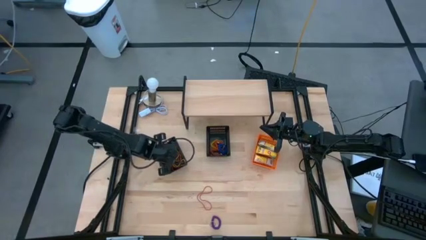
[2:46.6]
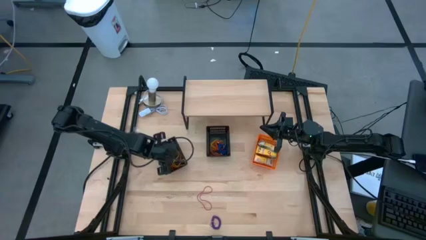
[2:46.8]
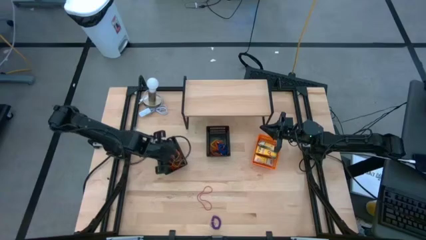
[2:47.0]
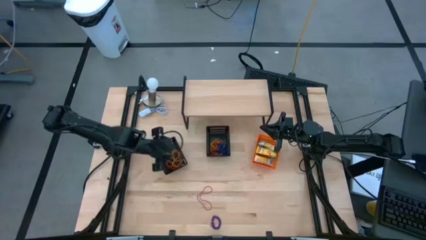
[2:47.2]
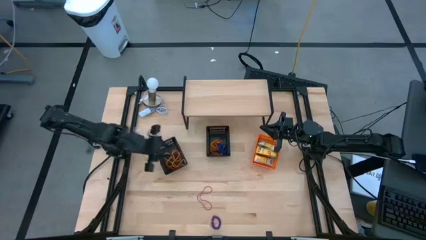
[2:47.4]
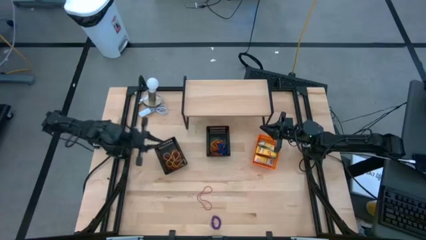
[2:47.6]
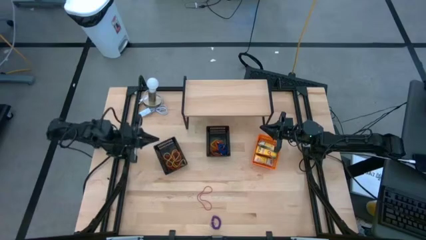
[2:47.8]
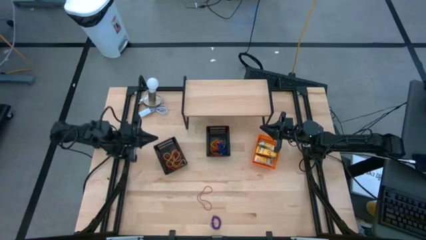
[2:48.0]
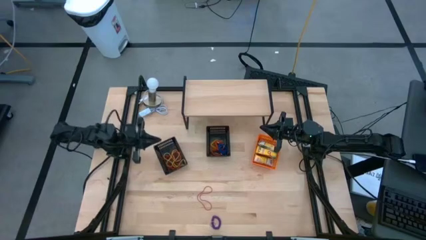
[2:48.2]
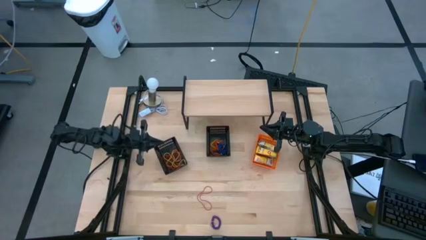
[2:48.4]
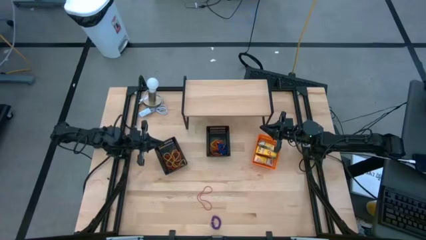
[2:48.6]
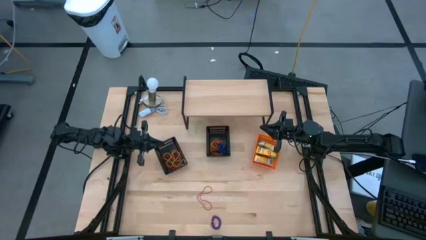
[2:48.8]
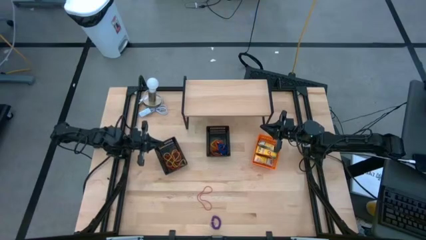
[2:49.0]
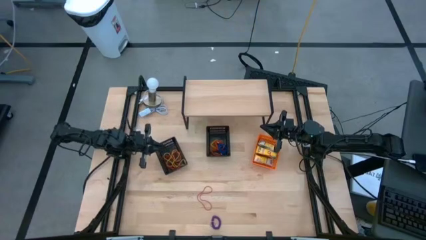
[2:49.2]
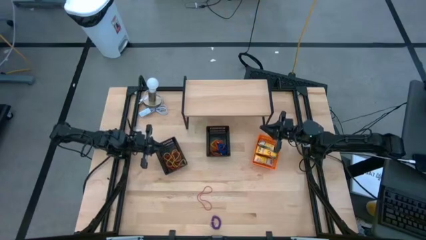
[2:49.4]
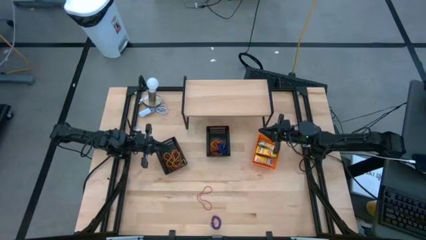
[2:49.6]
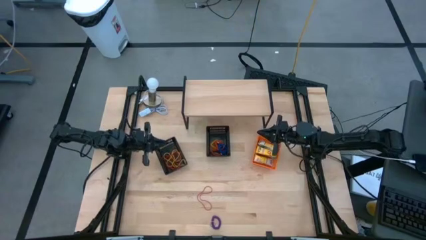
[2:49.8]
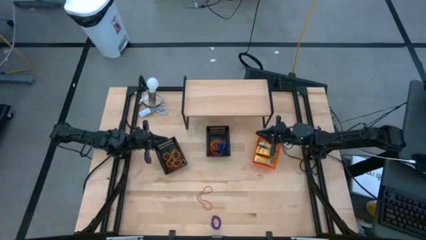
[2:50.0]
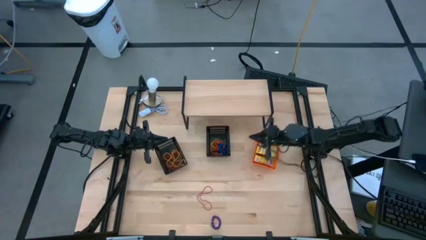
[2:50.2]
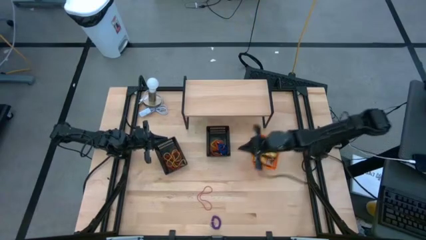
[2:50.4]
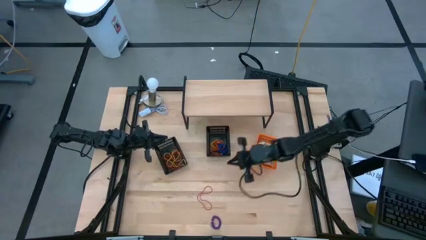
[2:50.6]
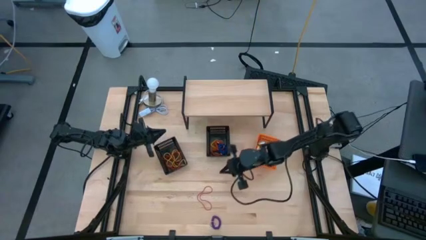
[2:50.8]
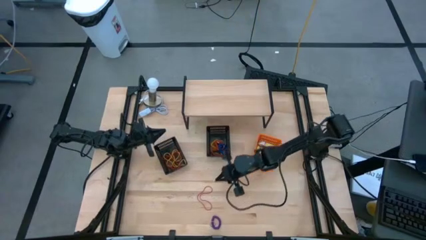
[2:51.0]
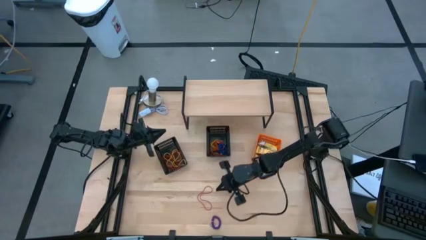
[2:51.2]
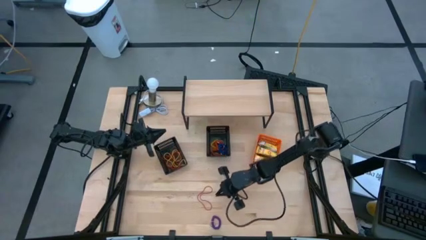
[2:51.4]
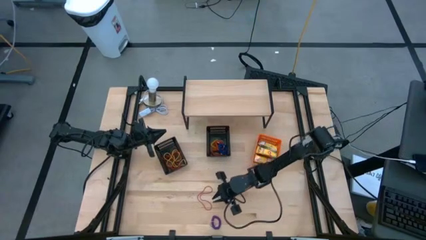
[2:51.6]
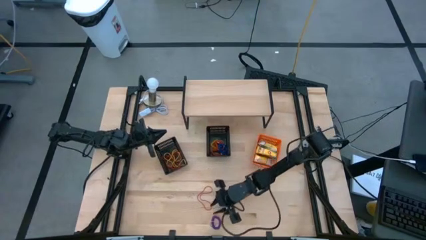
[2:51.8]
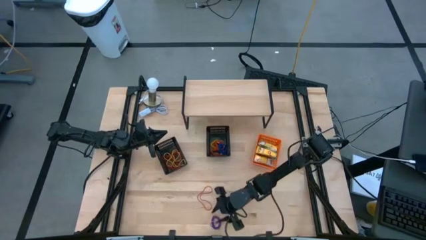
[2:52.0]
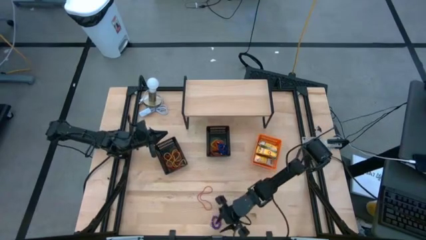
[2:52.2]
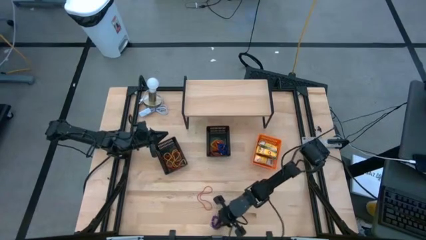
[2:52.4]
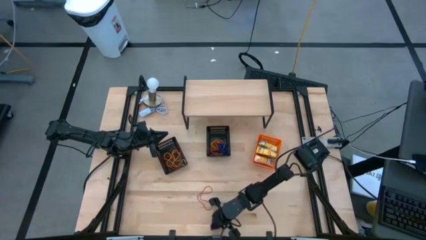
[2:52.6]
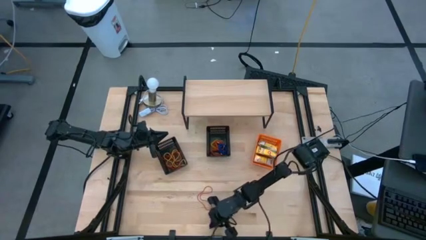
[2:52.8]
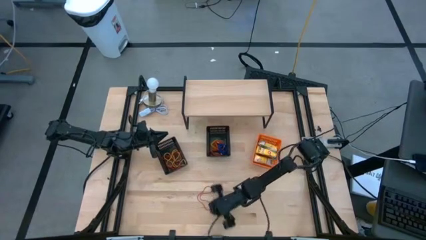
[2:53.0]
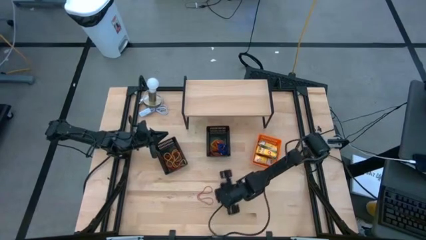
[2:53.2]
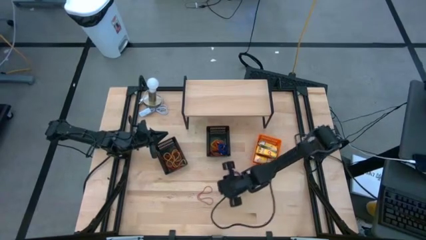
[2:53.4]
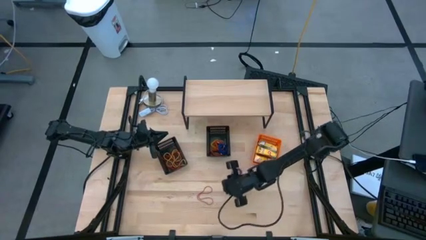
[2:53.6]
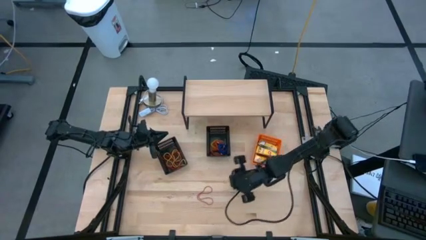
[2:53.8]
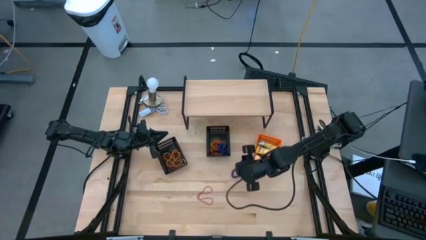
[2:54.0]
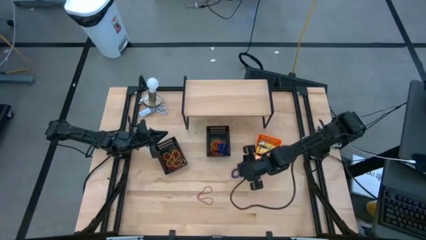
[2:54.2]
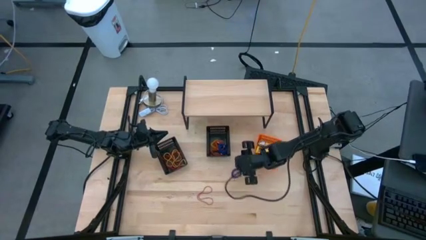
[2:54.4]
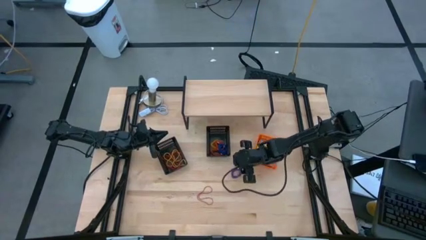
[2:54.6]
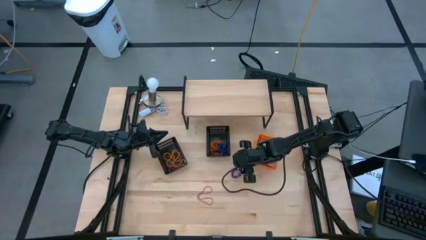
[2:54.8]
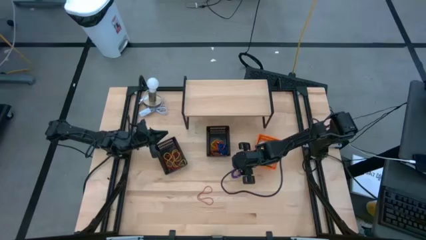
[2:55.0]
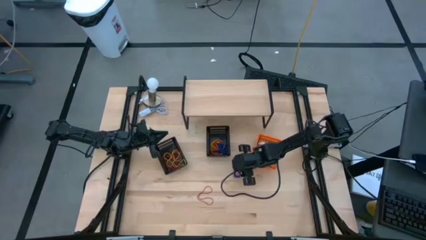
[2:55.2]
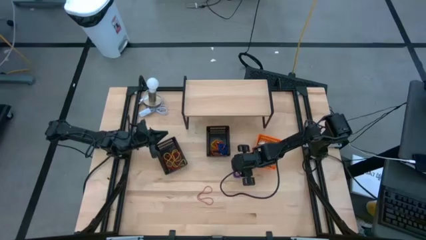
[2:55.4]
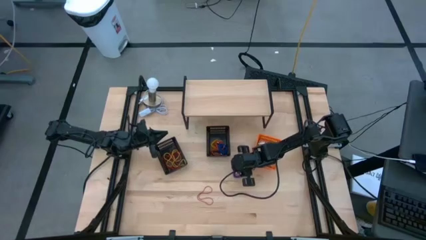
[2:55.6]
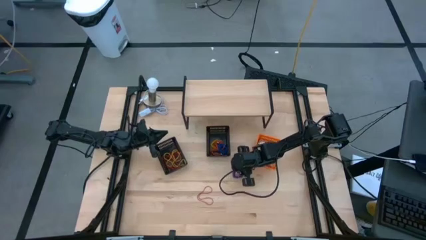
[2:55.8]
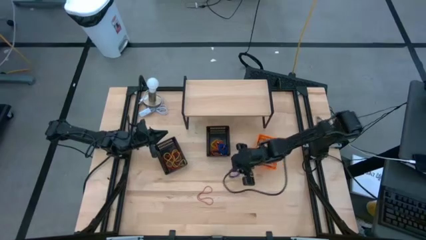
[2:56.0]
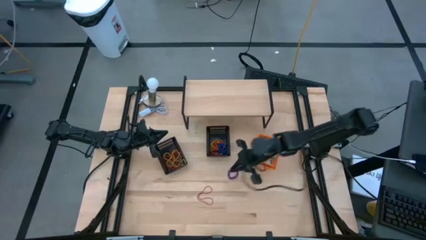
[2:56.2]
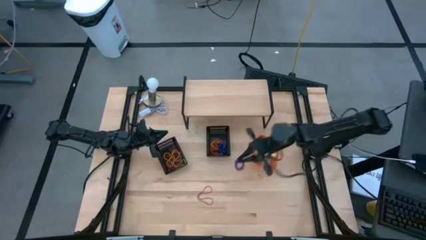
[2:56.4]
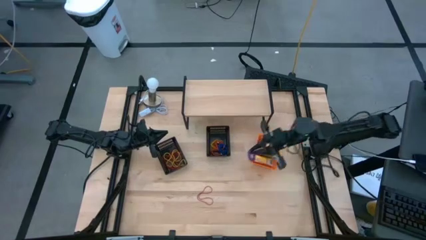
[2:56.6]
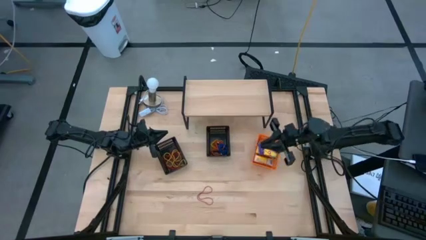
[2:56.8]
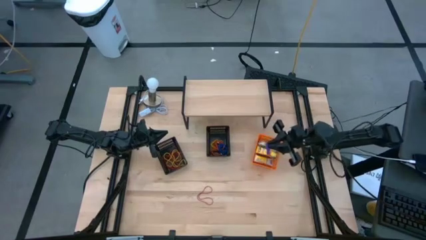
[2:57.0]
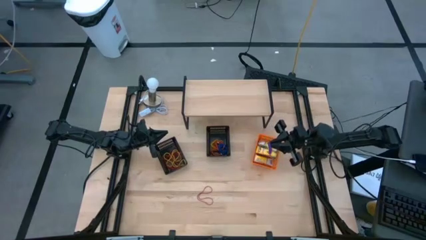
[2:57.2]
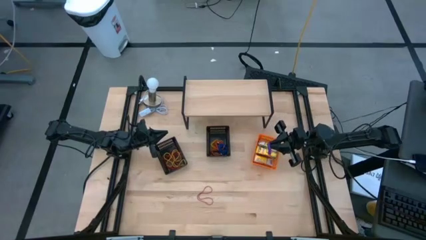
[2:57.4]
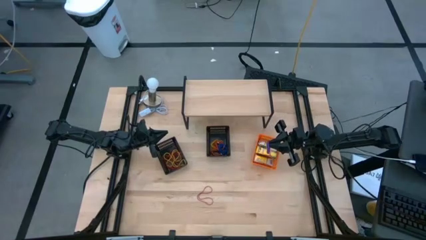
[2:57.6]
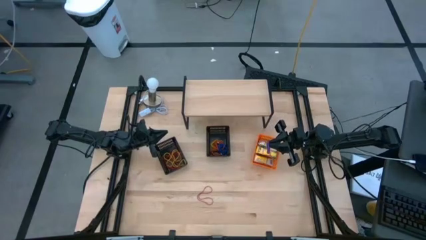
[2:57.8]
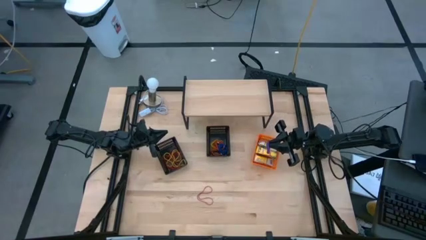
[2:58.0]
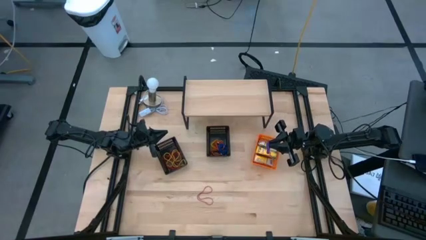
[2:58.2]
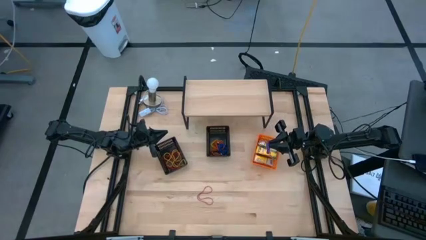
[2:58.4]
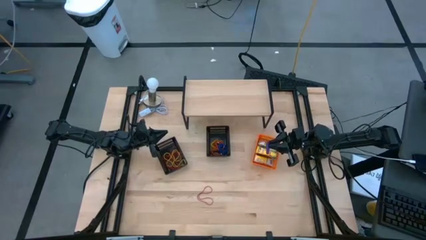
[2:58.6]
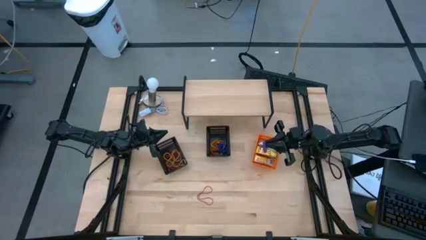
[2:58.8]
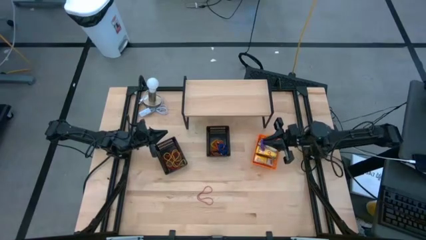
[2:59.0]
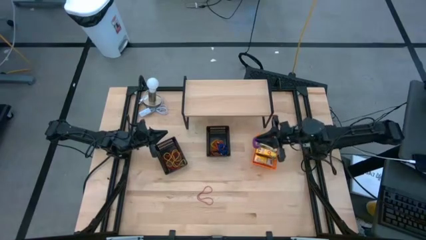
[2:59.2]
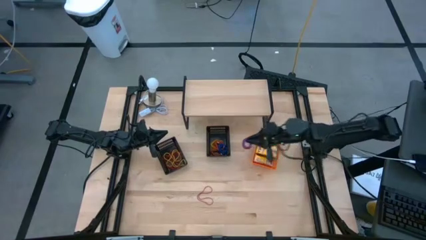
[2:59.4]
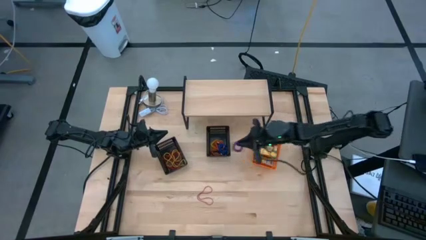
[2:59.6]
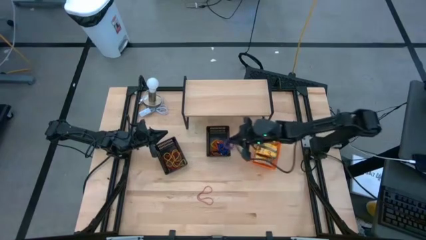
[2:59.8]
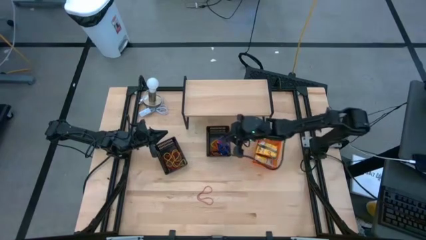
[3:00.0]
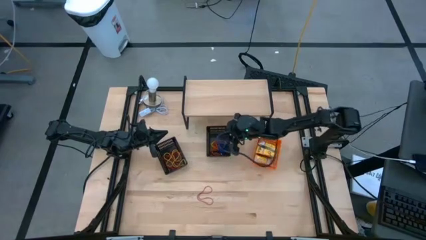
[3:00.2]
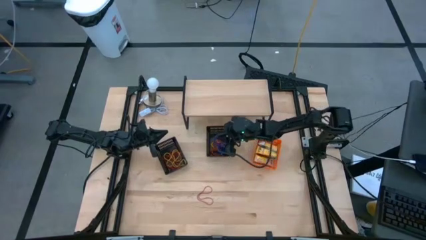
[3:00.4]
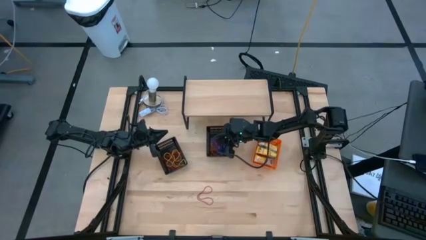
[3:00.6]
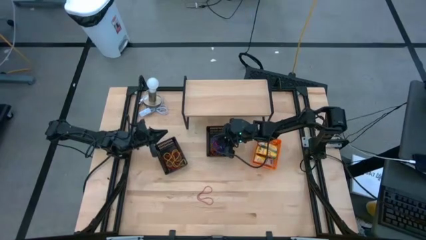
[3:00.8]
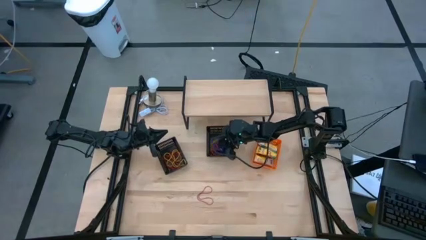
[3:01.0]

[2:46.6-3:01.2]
Task: Pick & Place Office Desk Supplies
Put the violet spring keychain into the right black basket

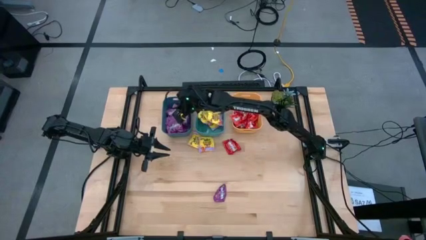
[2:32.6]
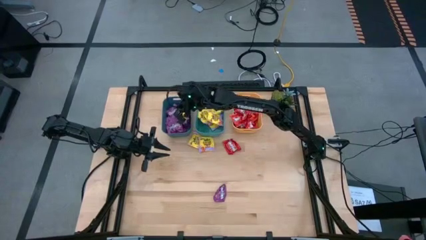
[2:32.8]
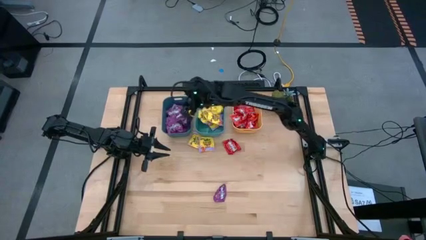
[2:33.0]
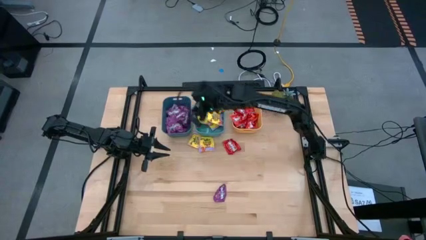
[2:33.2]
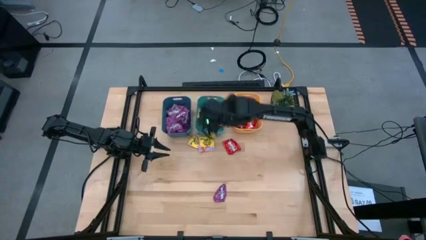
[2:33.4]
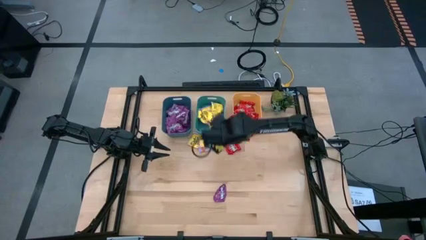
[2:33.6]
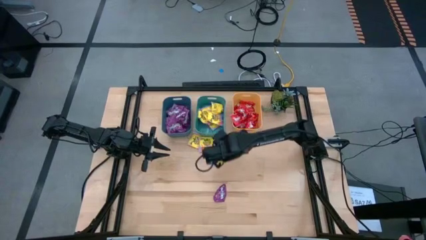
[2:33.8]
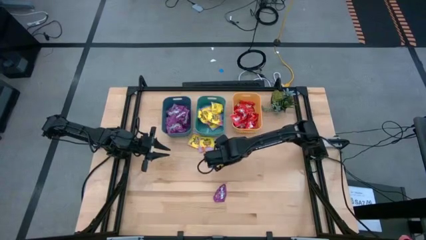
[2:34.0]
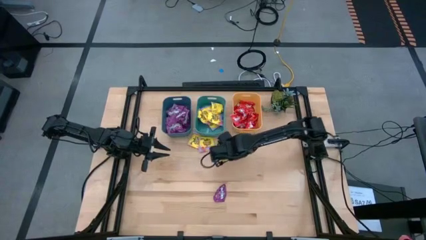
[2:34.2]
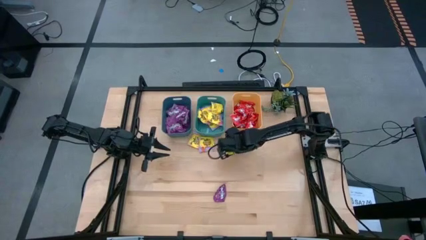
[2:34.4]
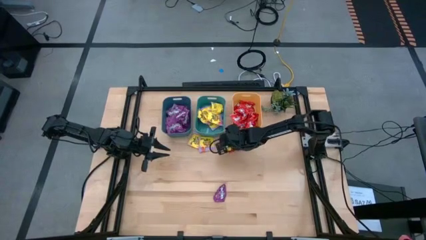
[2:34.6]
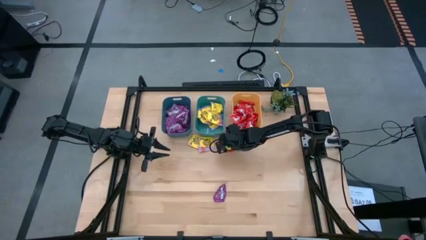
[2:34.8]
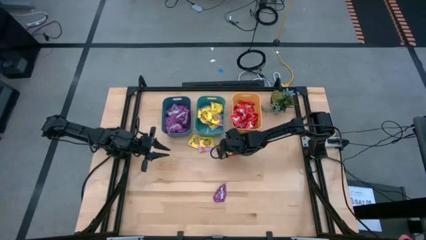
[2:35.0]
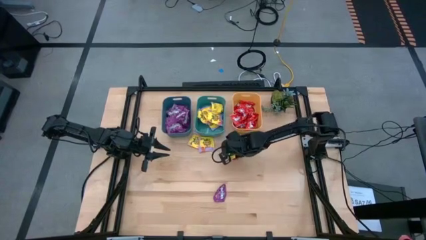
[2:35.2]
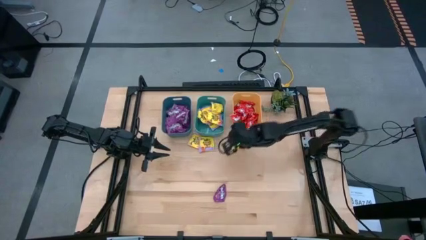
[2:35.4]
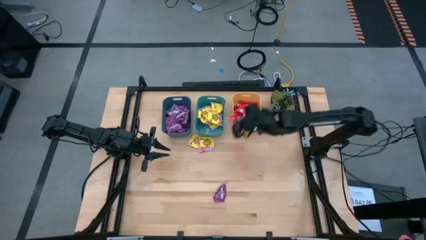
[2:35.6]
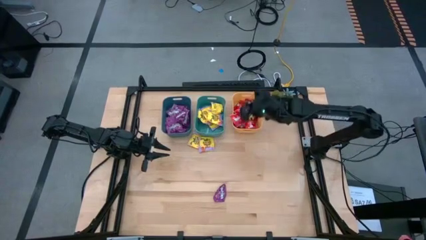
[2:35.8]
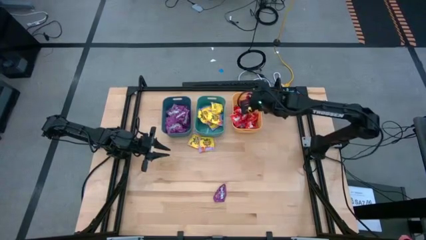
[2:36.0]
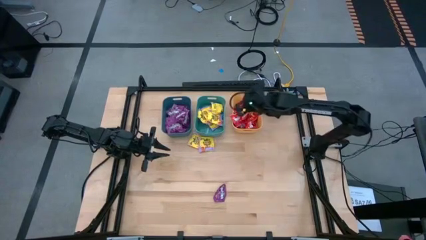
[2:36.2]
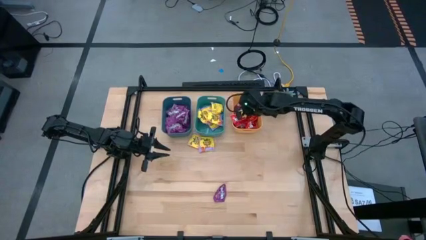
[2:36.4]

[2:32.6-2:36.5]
Task: Sort candy
Put the red candy into the yellow bin
